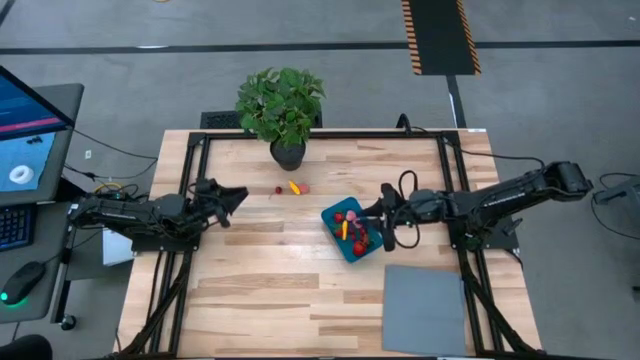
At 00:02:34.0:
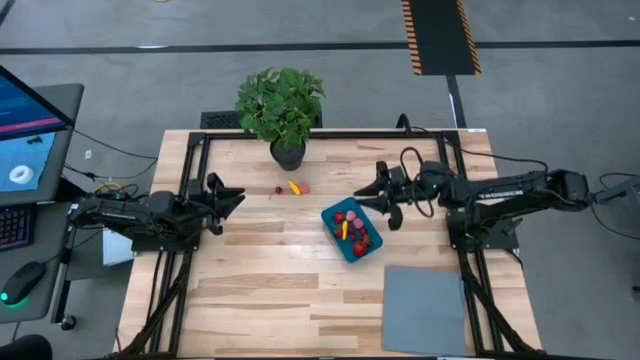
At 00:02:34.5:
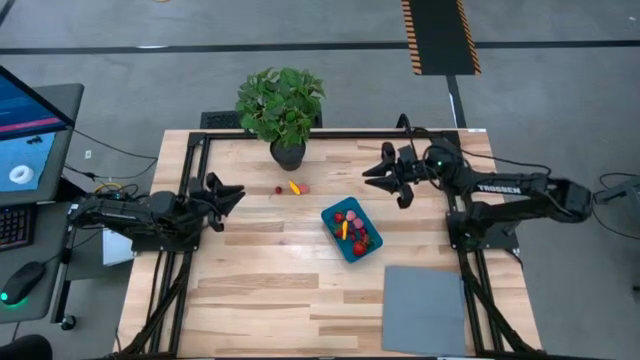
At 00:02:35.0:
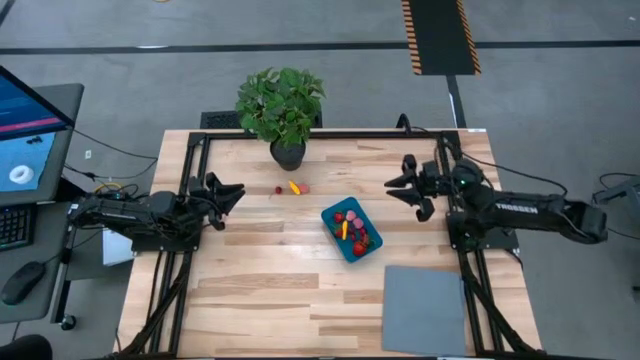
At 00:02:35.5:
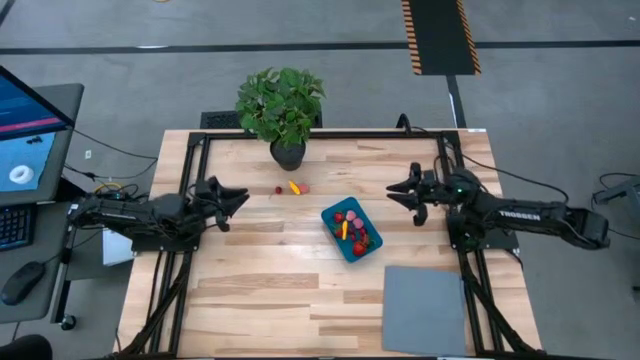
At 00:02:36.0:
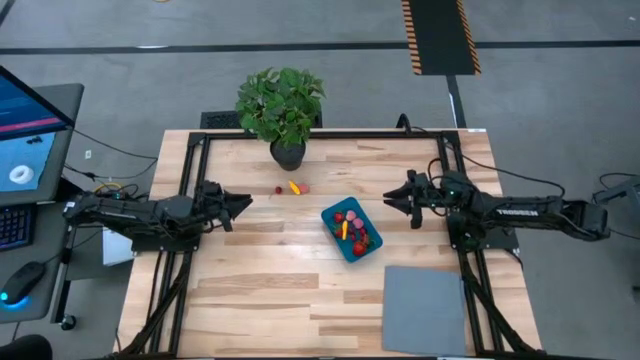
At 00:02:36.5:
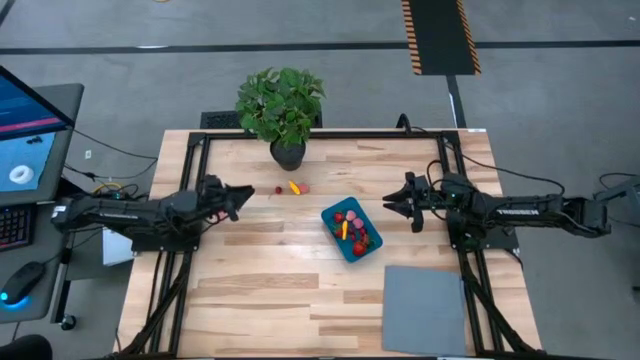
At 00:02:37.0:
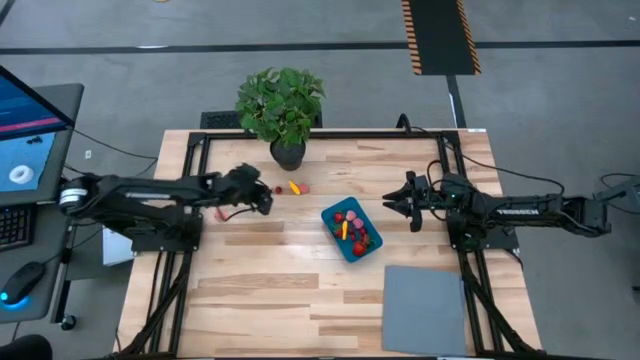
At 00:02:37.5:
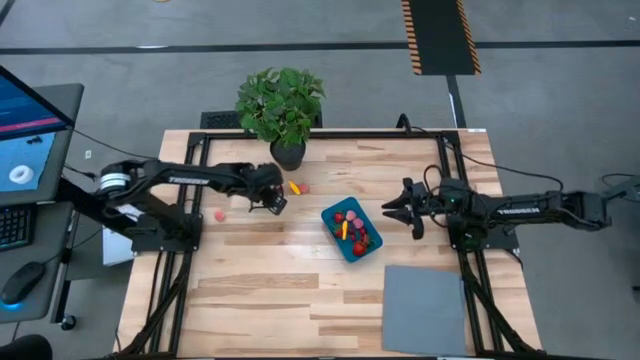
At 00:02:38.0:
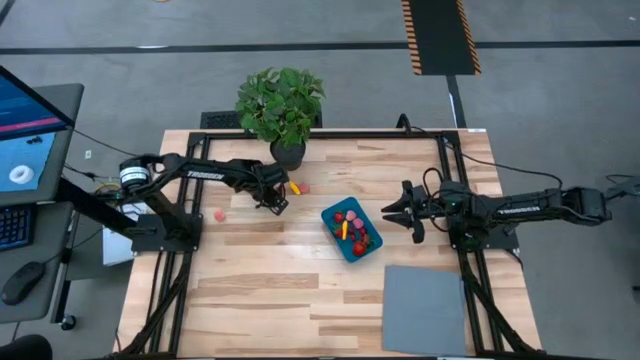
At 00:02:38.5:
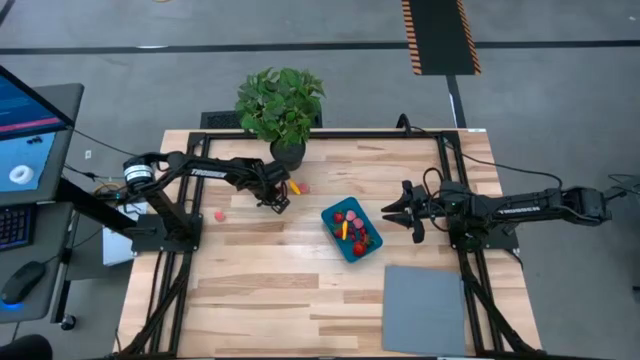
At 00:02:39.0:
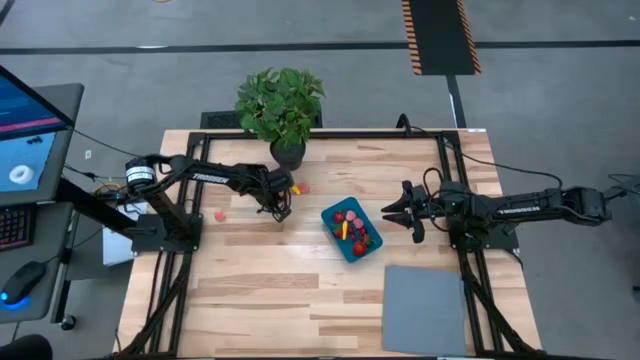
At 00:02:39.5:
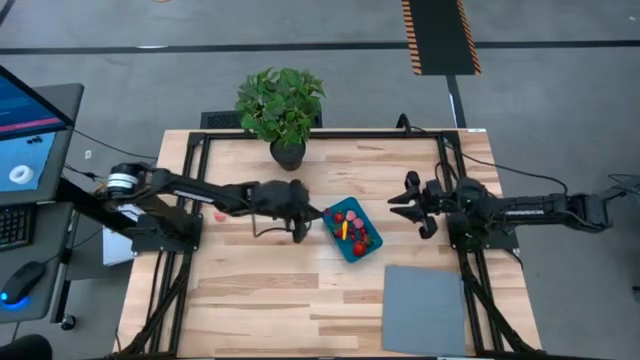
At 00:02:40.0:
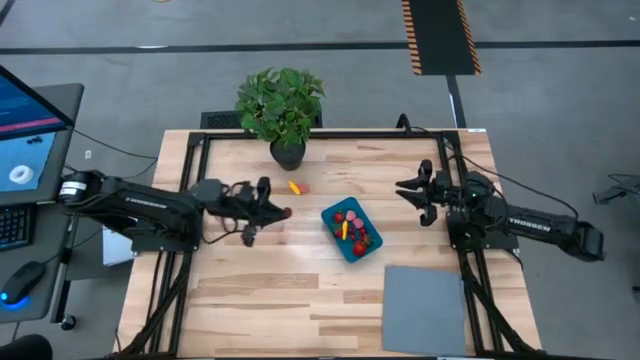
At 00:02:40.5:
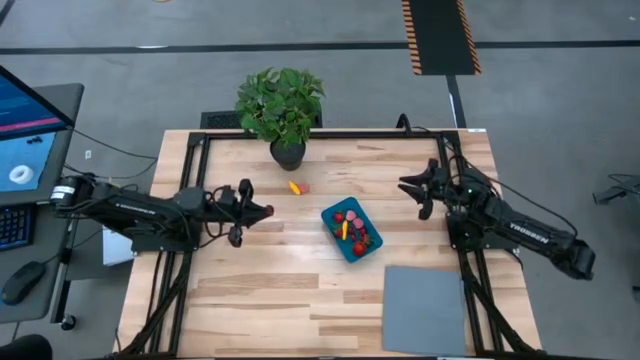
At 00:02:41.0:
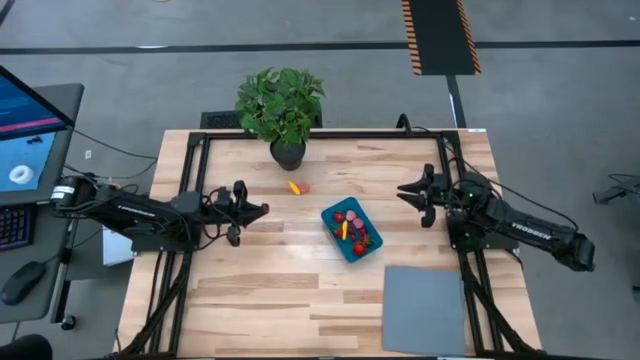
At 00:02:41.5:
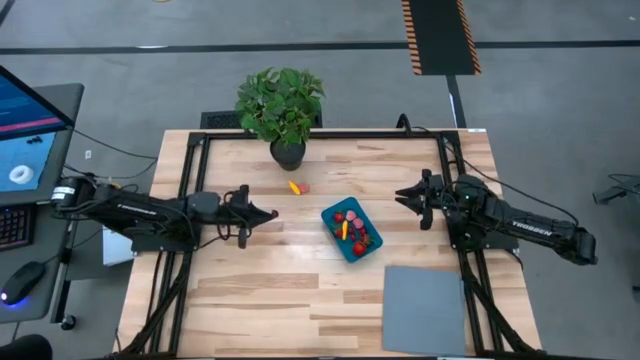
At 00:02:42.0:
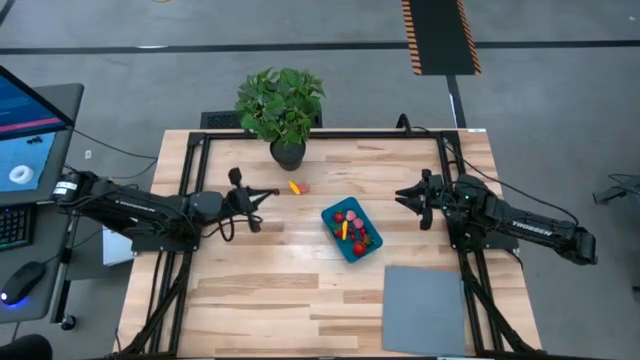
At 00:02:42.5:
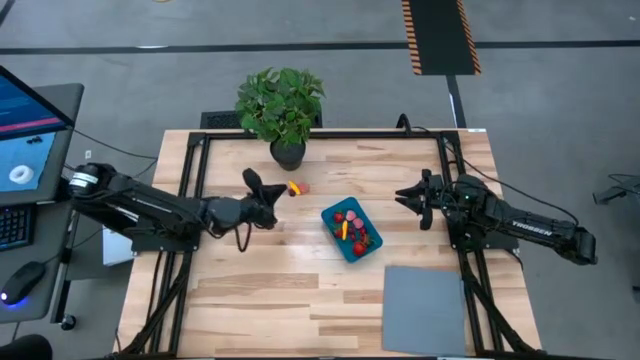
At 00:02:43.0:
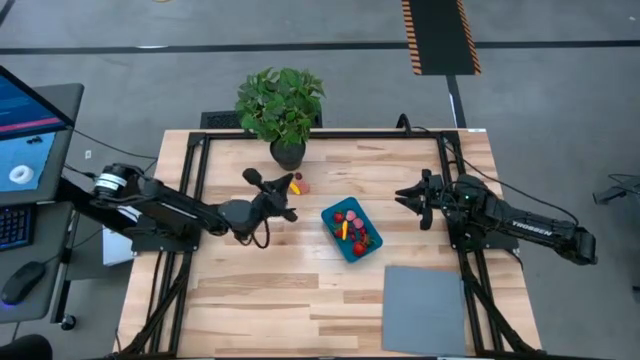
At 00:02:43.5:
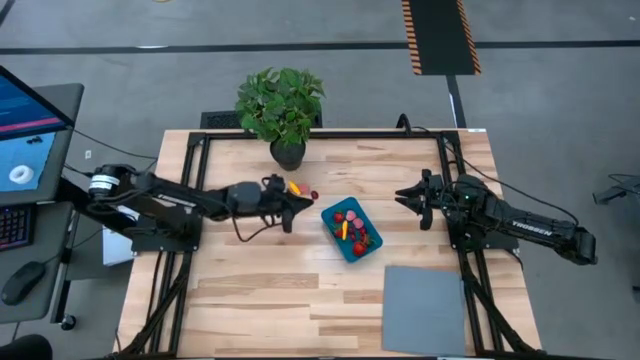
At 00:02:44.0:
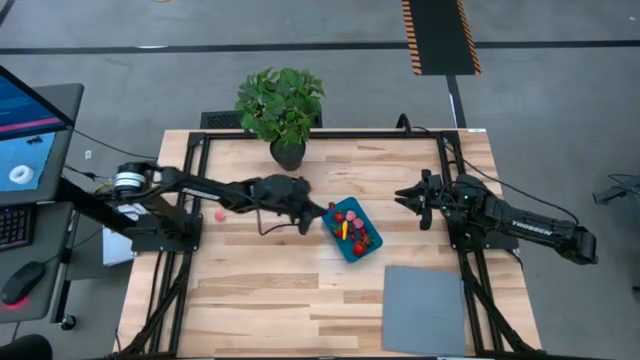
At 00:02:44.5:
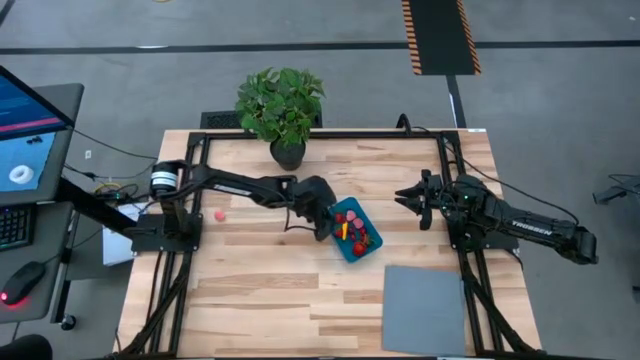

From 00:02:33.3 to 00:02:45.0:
Task: Pick and placing Produce into tupperware
Put the cherry into the blue bin

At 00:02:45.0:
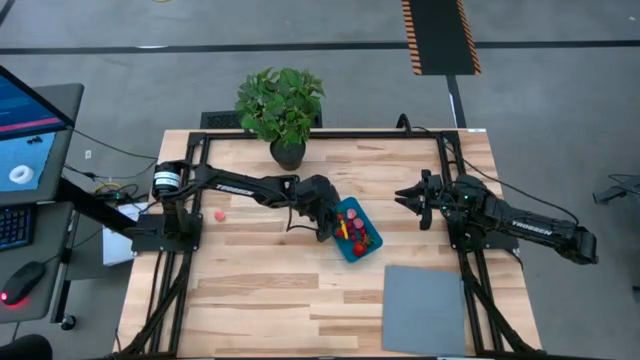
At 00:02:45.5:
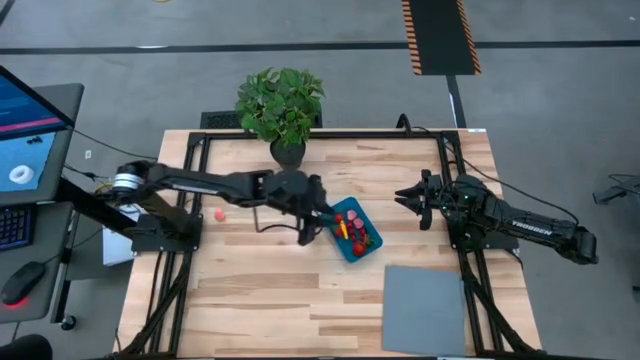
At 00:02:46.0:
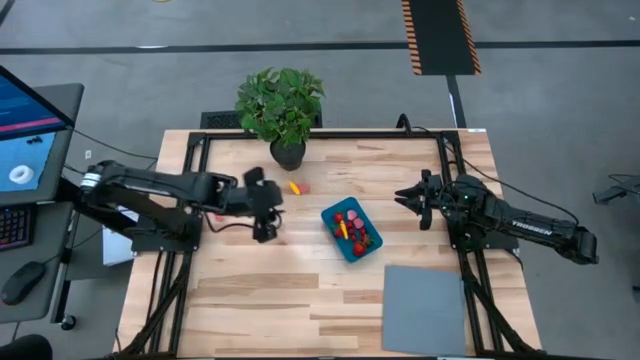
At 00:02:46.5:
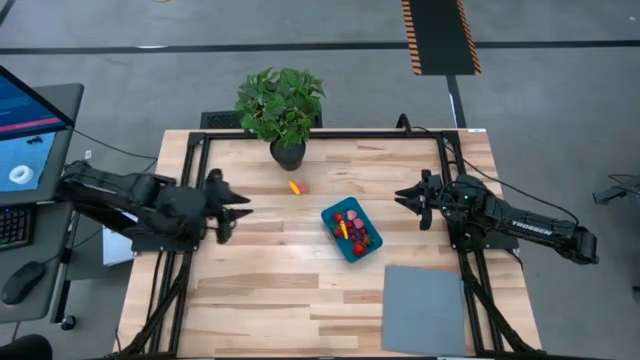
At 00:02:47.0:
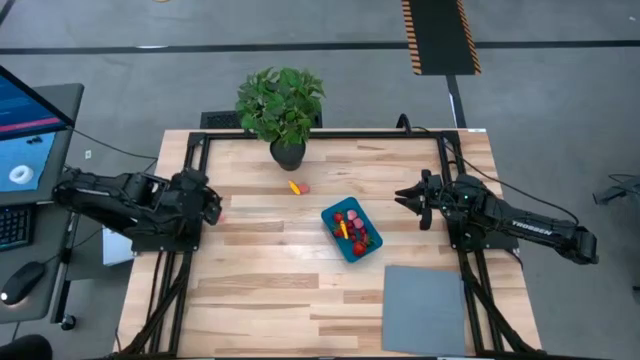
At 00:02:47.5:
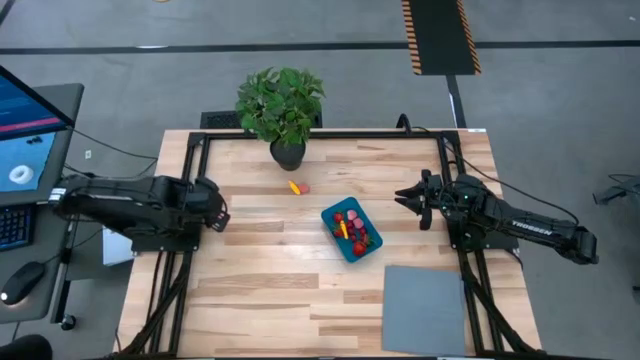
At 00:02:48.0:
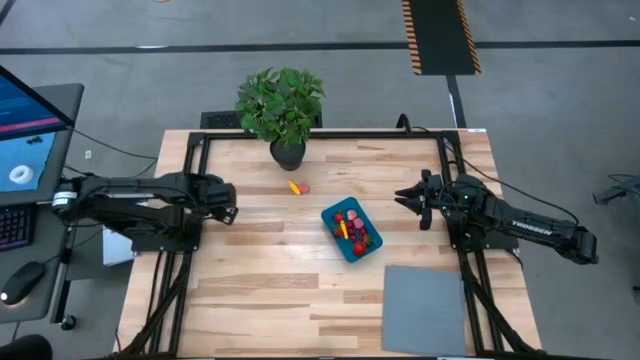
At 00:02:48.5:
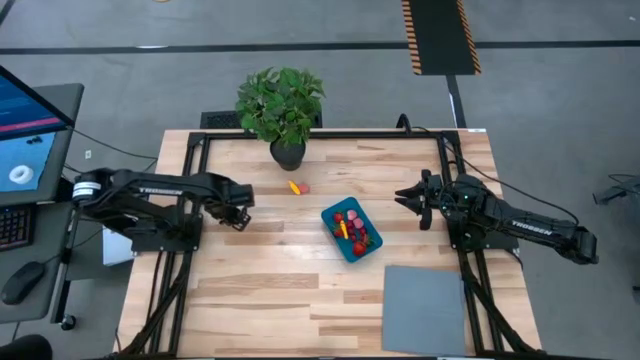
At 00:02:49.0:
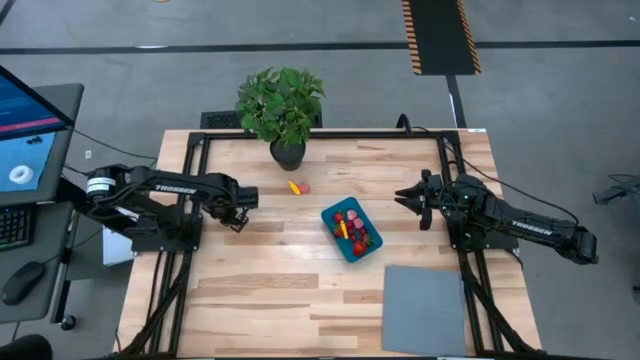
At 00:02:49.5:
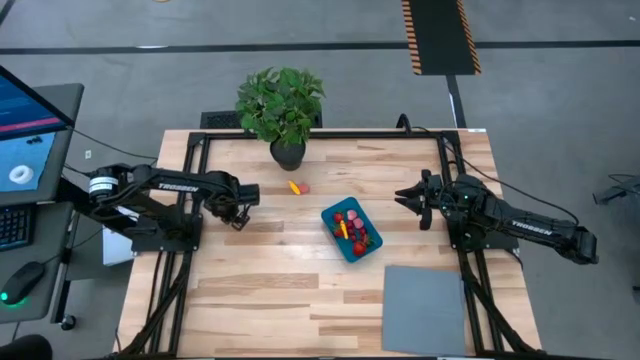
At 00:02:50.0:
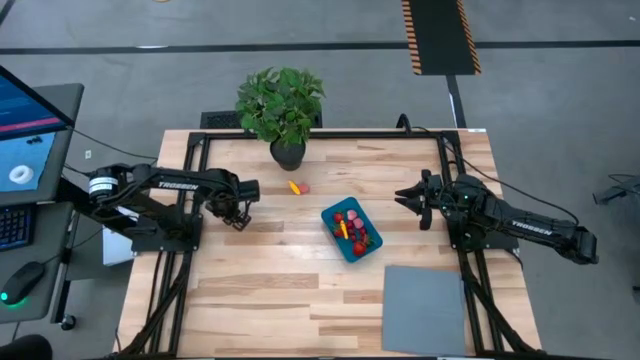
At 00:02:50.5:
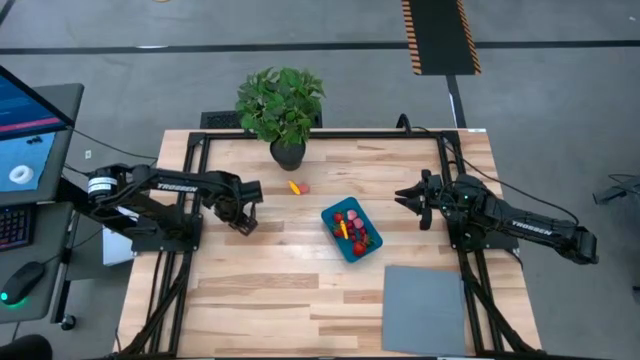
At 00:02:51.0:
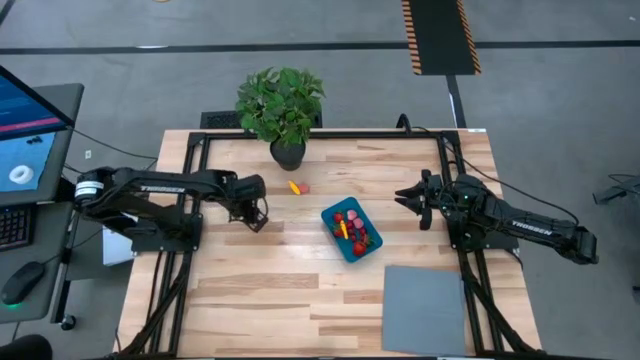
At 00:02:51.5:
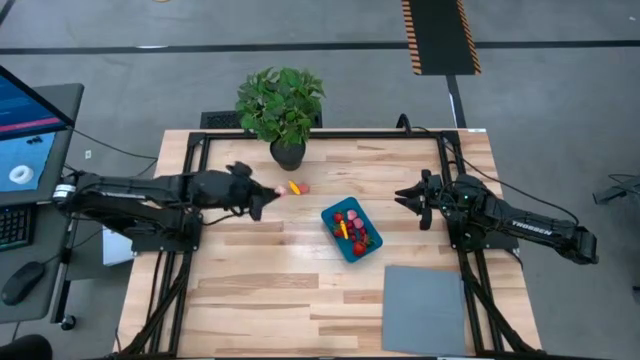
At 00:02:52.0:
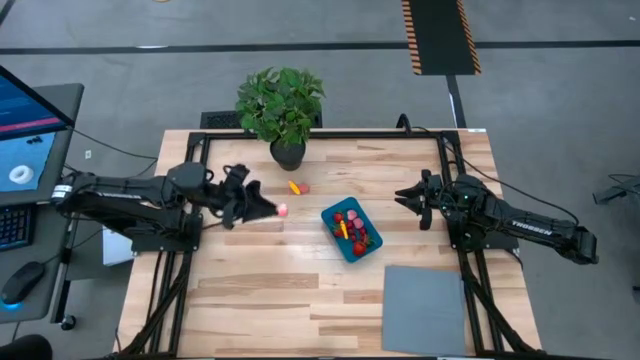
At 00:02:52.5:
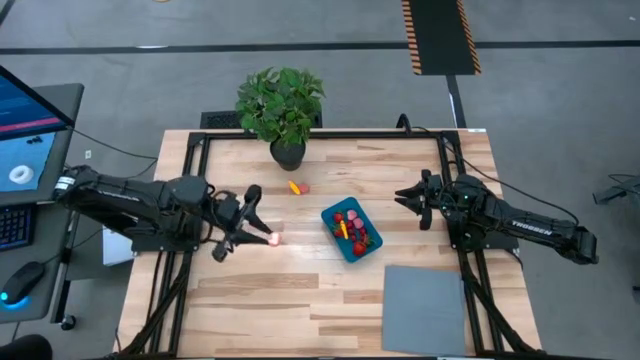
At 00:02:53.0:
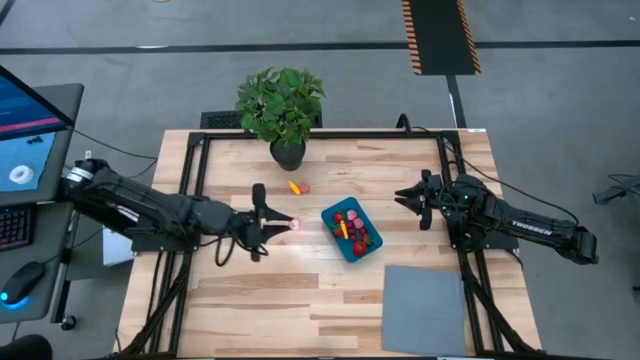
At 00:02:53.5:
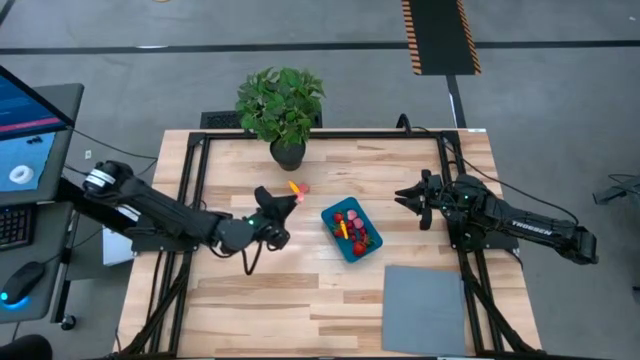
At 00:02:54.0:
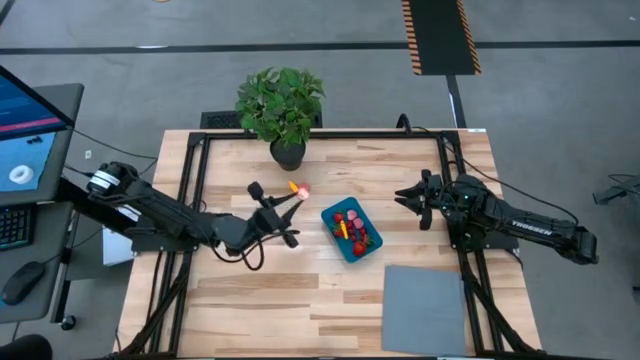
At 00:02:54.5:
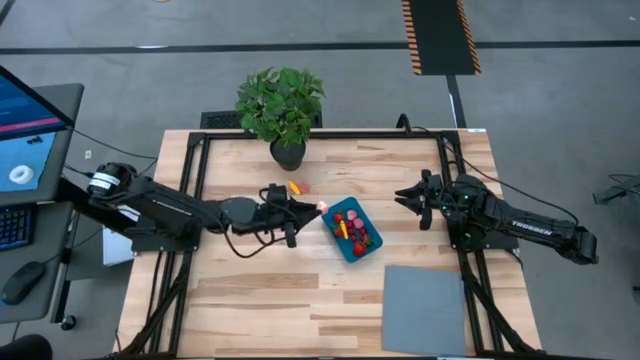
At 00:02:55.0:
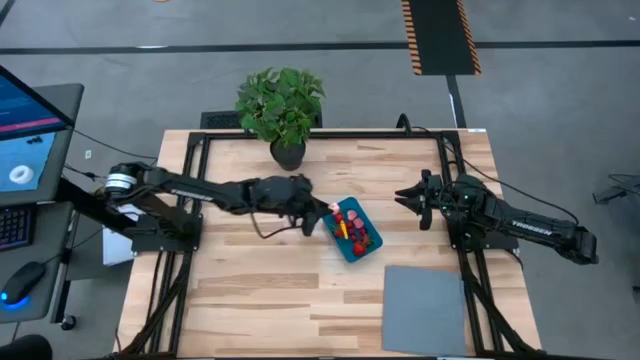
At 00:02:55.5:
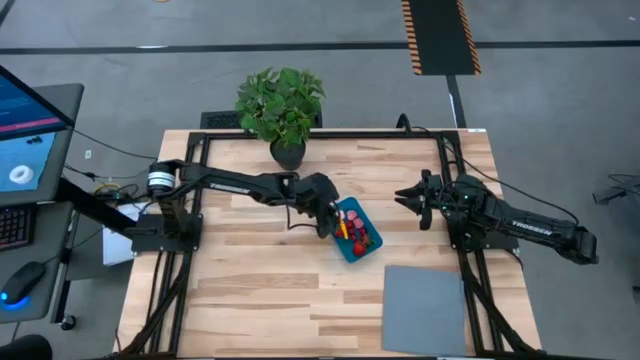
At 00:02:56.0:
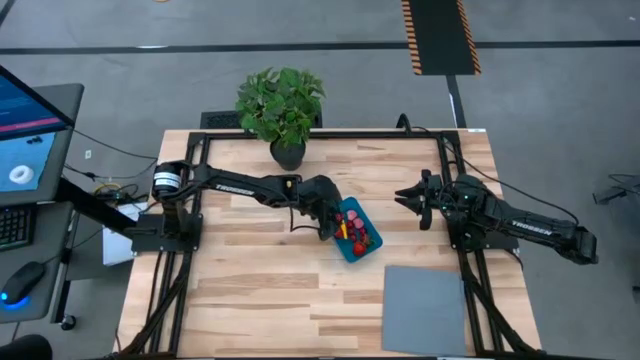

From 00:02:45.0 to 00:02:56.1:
Put the left apricot into the blue bin
